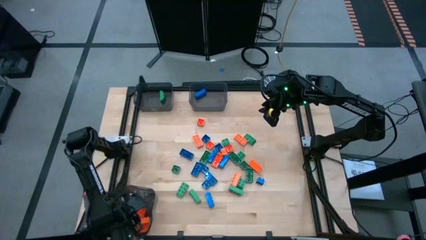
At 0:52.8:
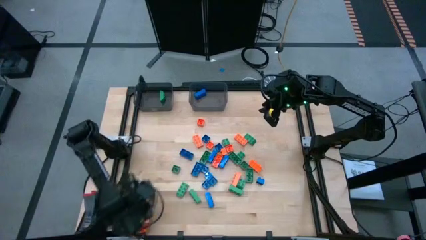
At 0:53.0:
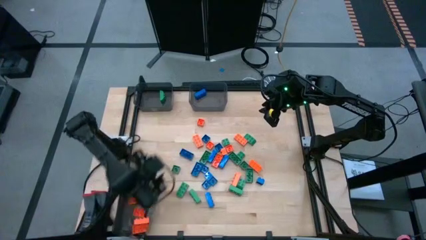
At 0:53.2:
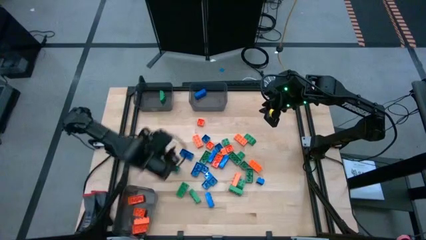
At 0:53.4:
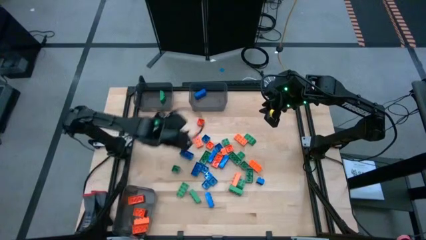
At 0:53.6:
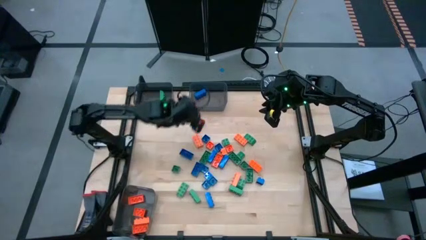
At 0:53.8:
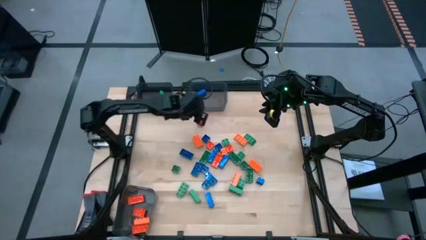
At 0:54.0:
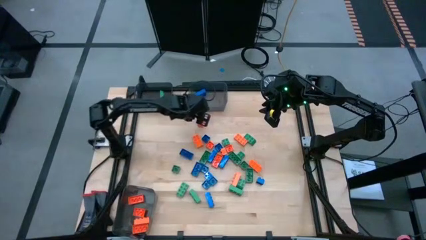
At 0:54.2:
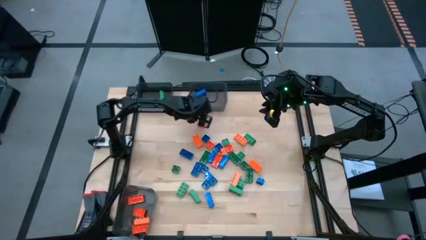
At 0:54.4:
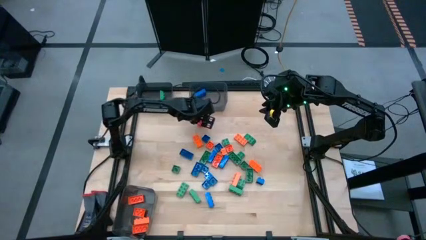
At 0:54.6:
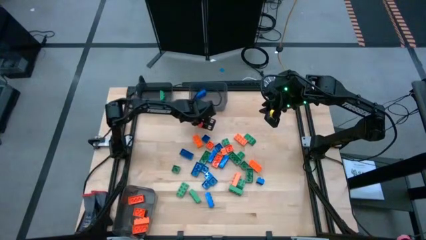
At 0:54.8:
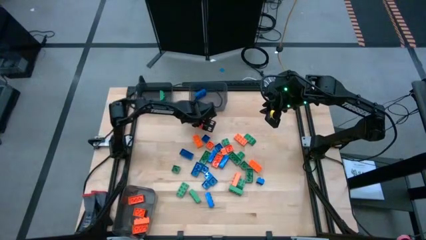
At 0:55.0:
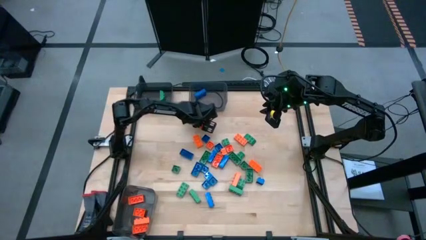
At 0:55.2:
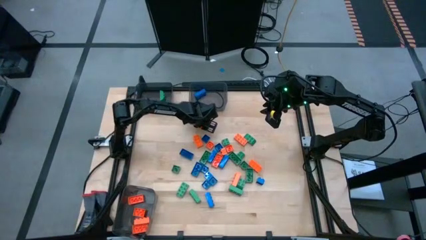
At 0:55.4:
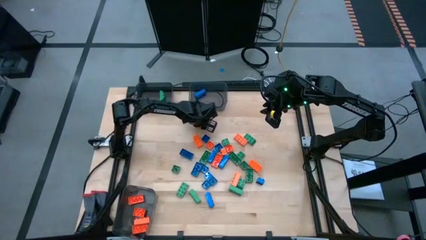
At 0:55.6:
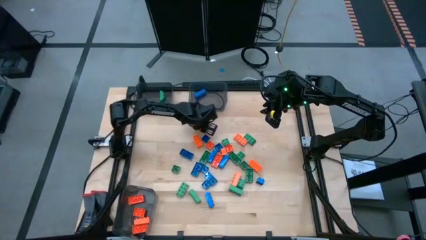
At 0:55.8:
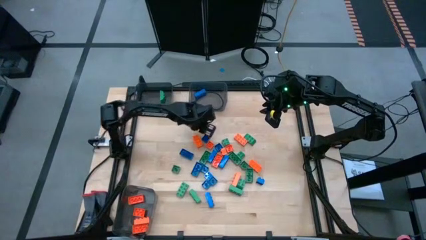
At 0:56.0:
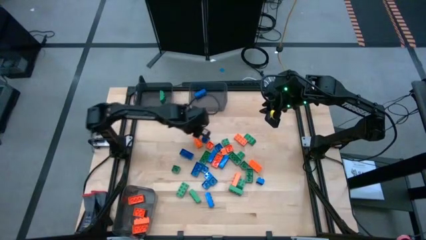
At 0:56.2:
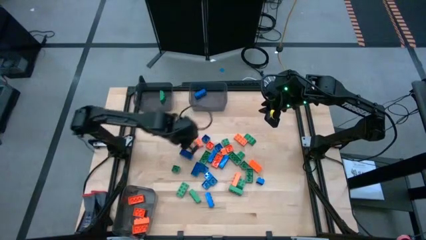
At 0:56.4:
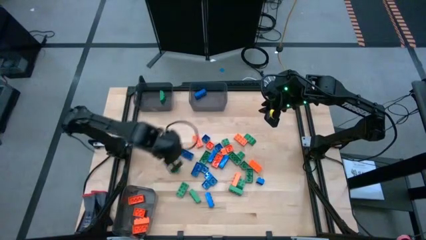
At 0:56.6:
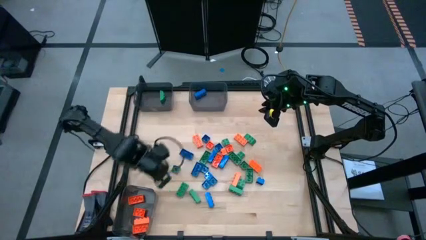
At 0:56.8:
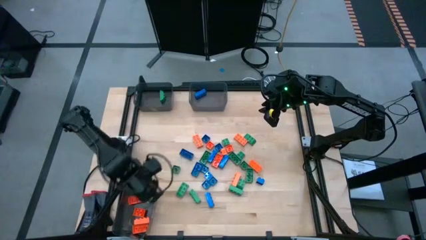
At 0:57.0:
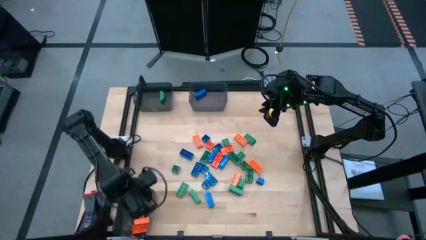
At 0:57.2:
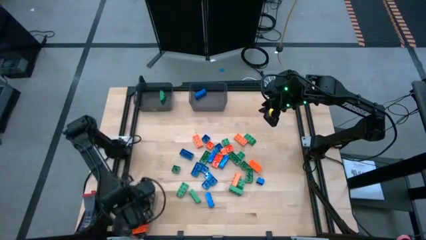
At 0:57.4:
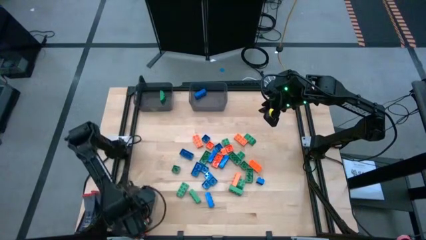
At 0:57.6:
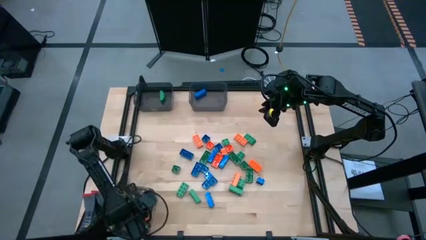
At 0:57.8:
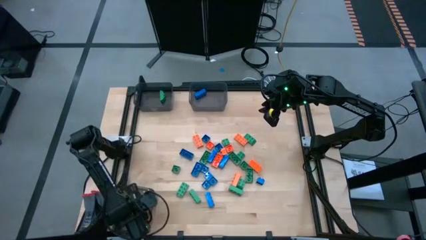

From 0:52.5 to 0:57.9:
Task: Sort blocks
Put the orange gamepiece into the bottom black bin

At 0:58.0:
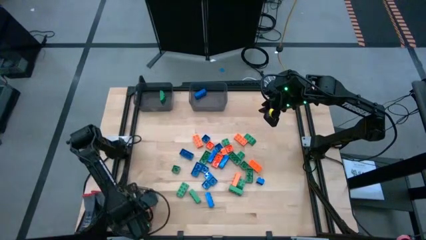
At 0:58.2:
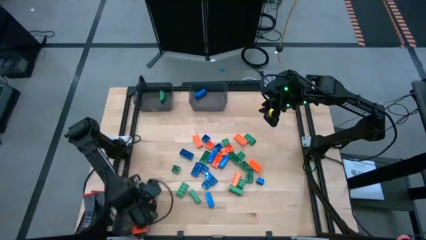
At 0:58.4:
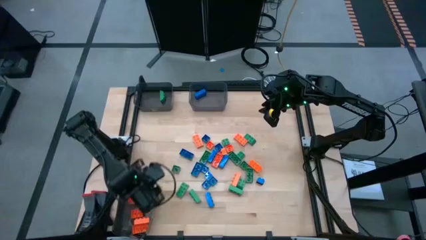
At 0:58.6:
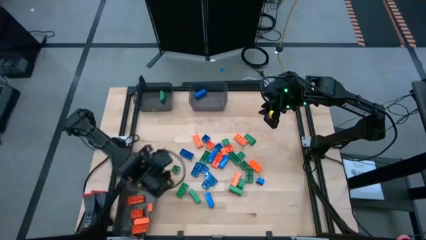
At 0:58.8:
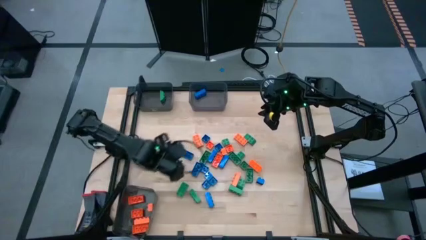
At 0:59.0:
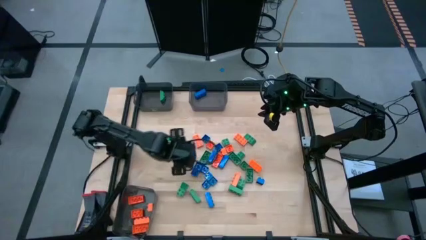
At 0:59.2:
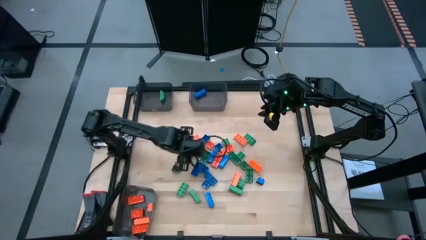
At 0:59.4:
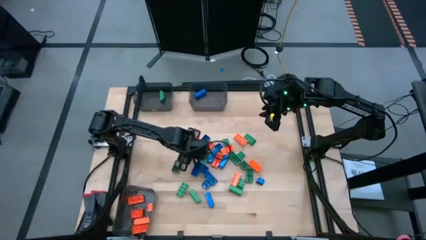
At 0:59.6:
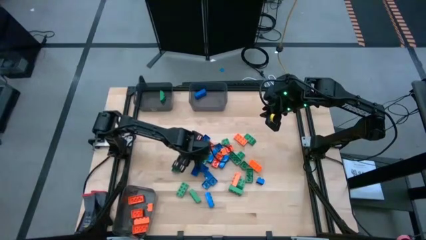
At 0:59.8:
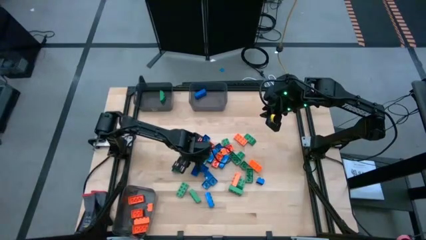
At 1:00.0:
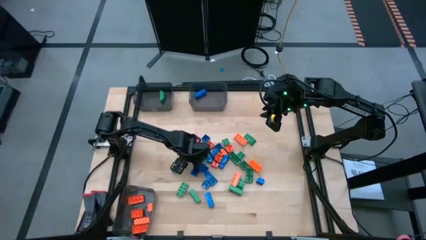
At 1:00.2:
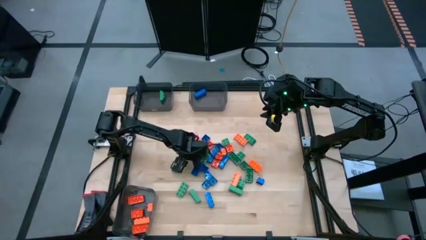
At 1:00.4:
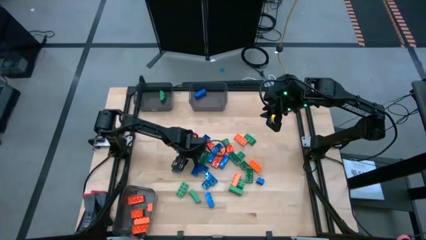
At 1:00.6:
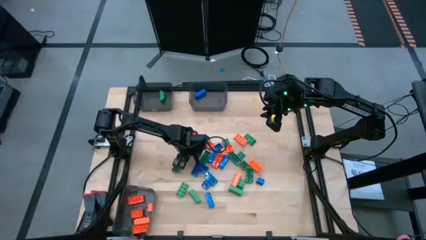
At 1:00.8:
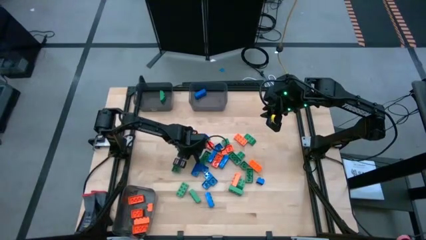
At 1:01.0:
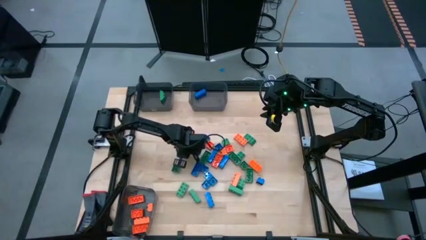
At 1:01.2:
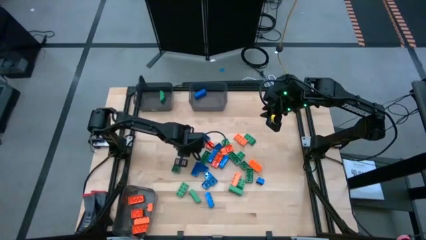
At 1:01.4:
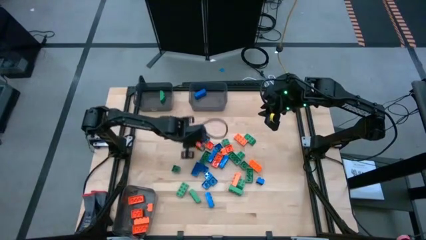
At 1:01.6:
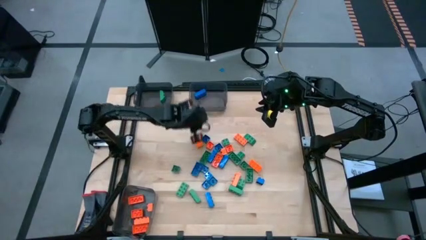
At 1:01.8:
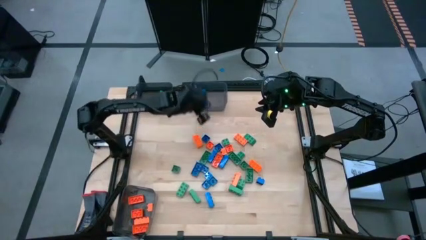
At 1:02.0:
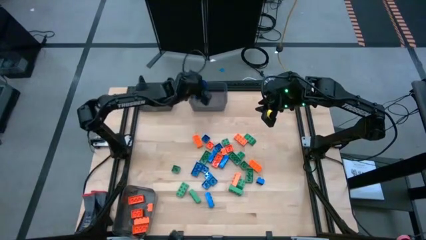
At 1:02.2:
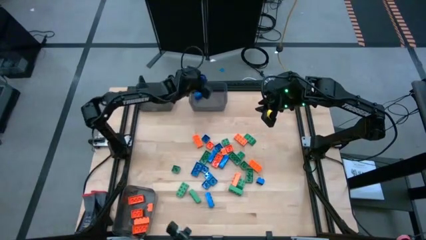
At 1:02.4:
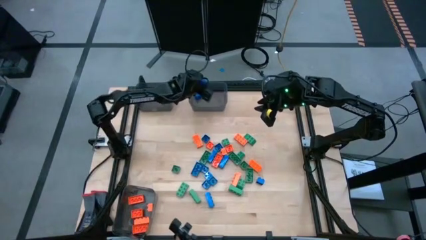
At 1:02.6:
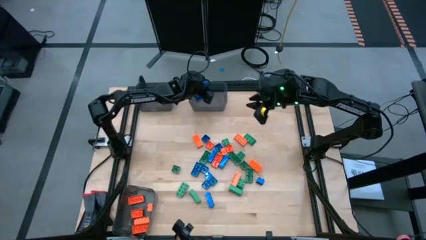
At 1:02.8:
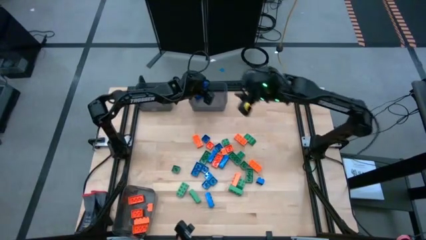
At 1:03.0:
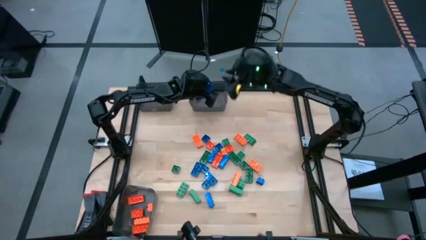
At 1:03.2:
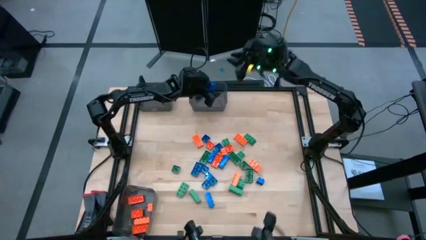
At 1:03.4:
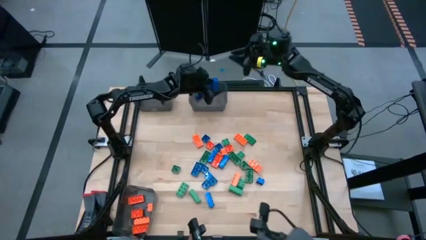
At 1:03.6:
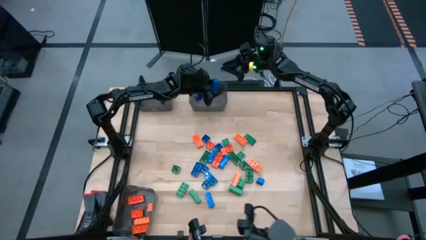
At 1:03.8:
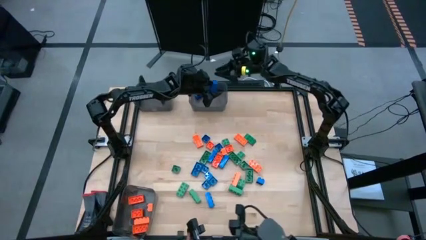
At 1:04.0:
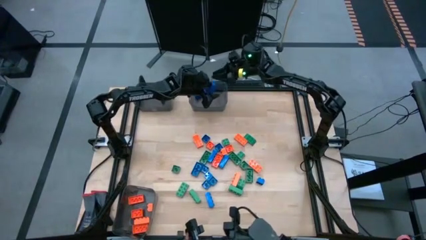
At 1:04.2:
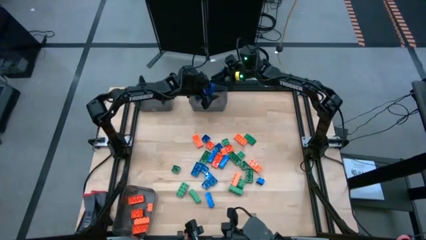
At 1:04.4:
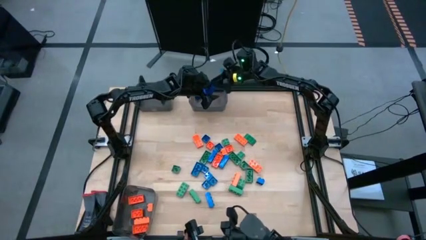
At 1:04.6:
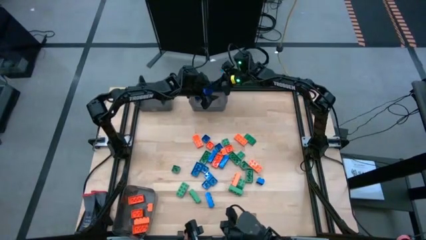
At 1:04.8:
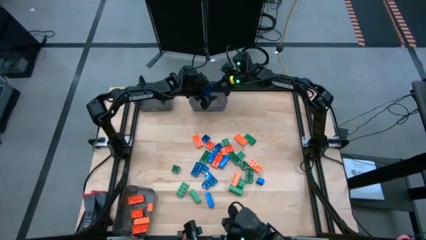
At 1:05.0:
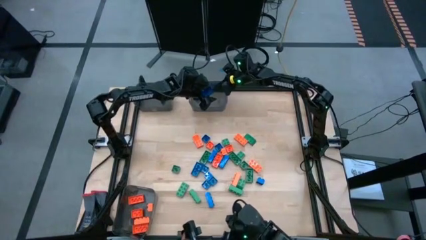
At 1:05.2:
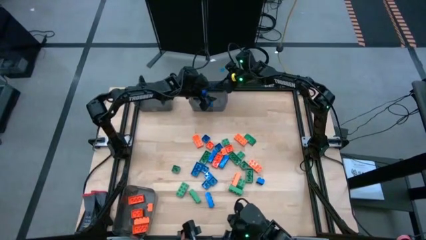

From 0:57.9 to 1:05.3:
Put the blue gamepiece into the top right black bin

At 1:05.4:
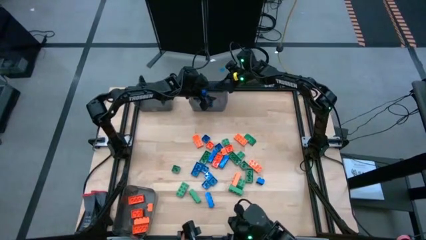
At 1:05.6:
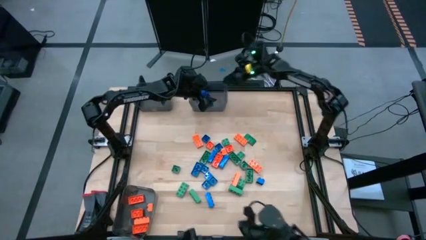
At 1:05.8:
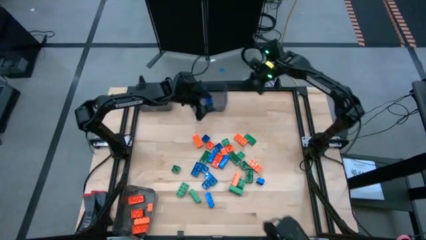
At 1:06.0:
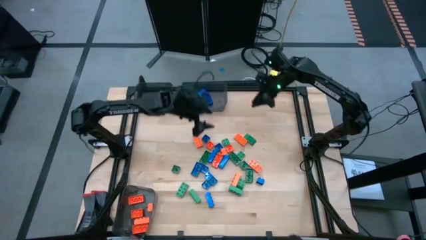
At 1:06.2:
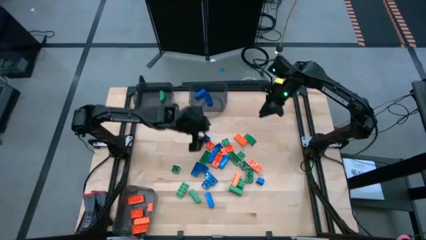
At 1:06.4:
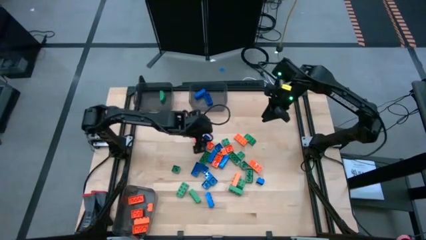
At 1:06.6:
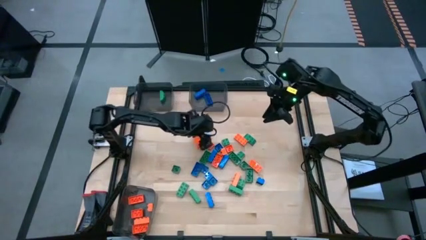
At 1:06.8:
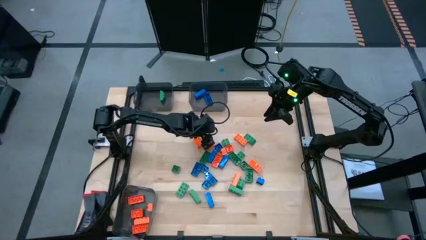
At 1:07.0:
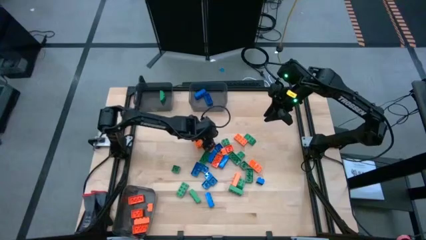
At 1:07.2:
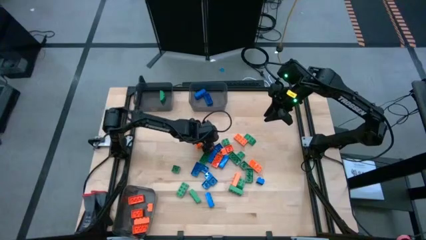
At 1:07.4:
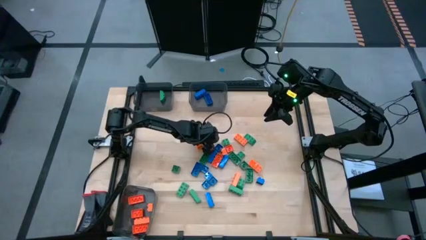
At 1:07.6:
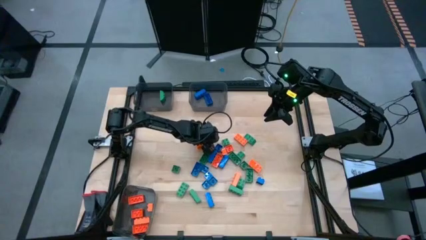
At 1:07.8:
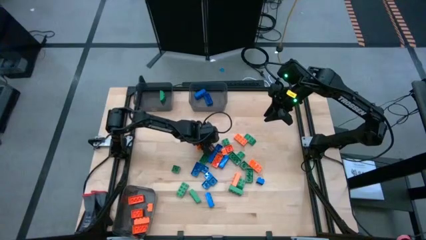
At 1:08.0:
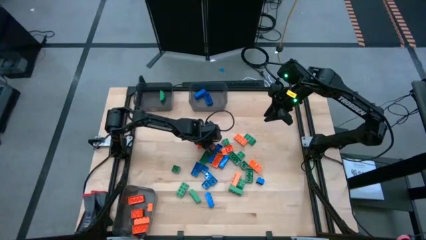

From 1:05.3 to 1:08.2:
Put the blue gamepiece into the top right black bin

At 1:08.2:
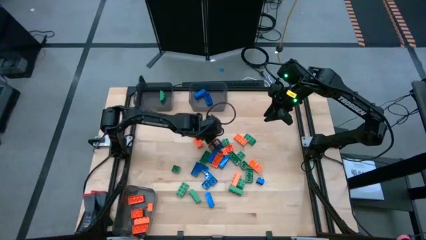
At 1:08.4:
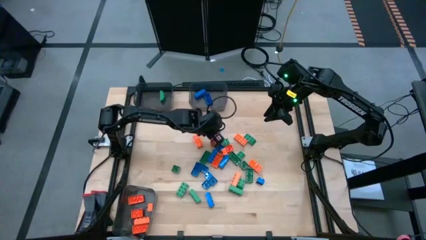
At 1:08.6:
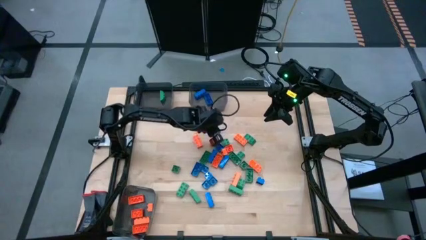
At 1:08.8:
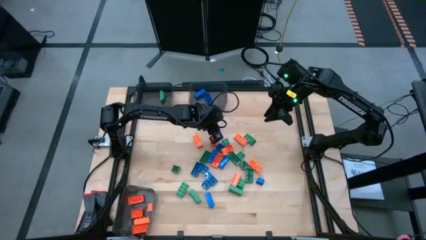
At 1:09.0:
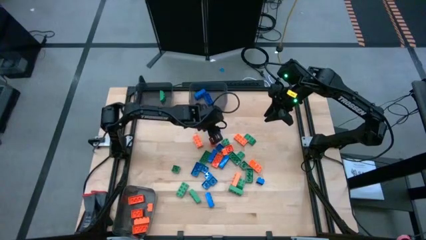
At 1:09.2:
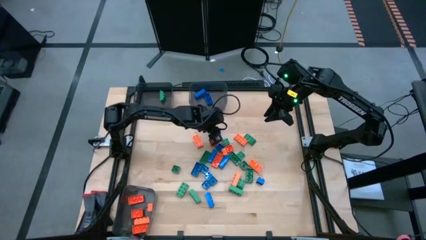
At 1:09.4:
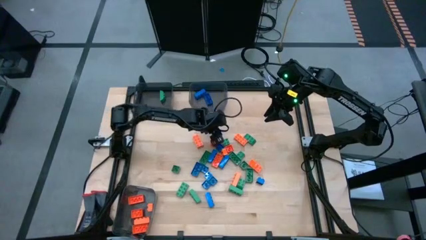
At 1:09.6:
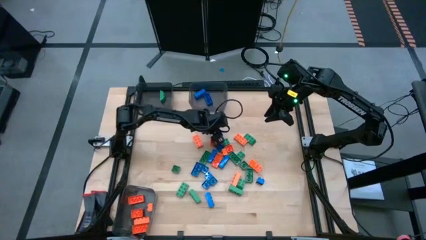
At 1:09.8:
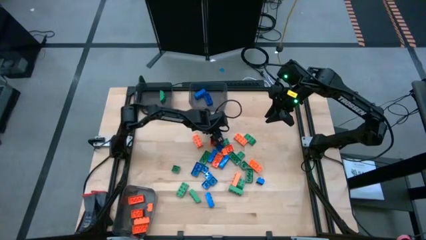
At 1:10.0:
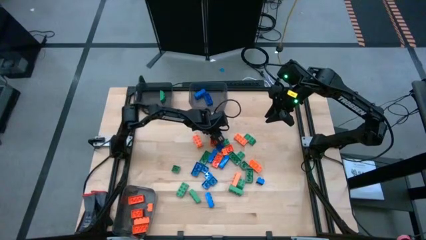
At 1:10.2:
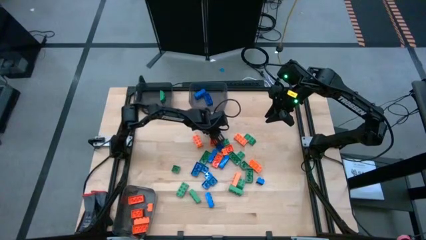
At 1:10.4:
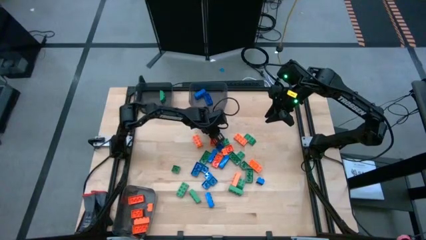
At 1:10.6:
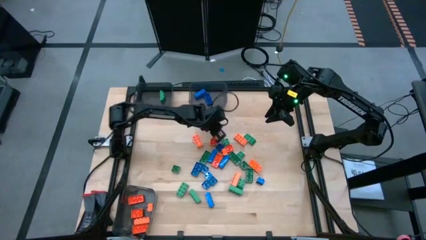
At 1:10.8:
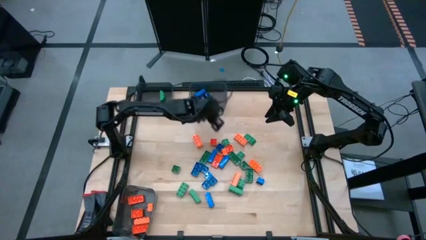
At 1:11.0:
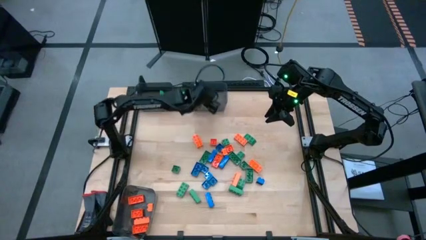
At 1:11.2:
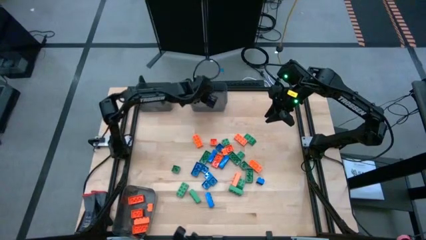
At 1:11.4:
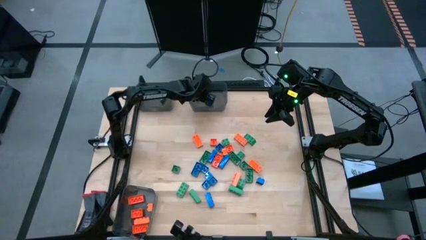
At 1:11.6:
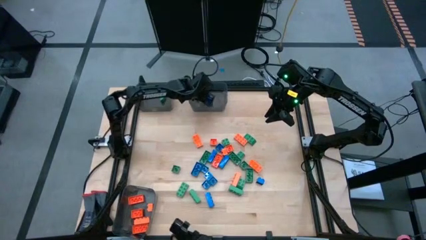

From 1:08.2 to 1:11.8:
Put the blue gamepiece into the top right black bin
